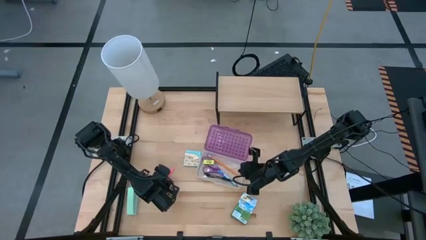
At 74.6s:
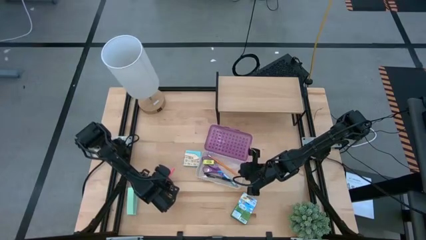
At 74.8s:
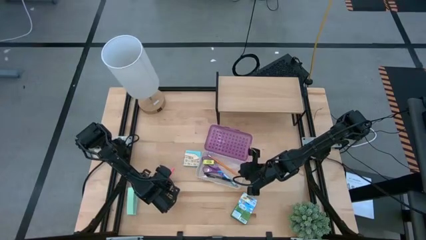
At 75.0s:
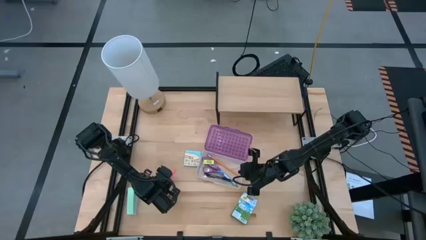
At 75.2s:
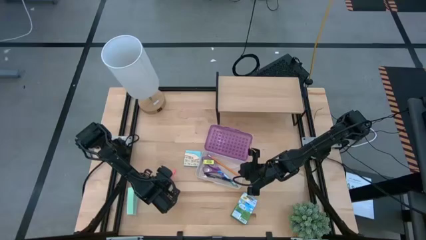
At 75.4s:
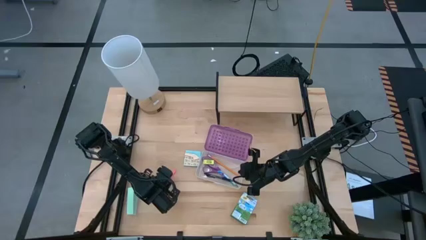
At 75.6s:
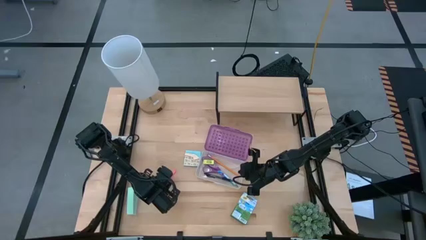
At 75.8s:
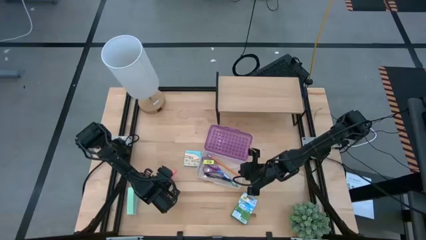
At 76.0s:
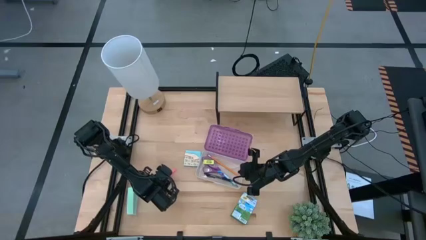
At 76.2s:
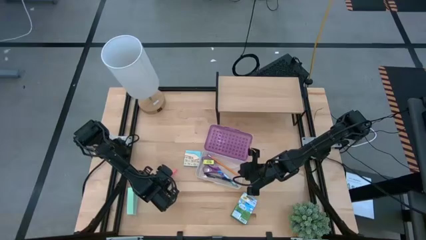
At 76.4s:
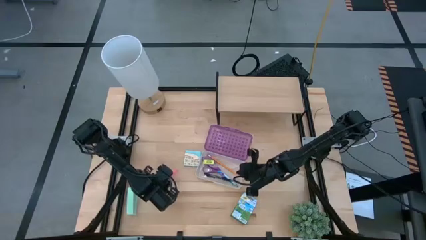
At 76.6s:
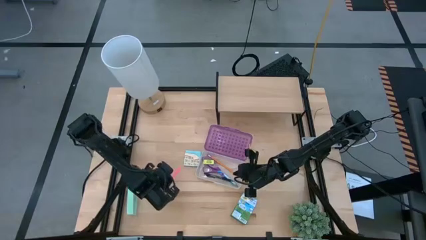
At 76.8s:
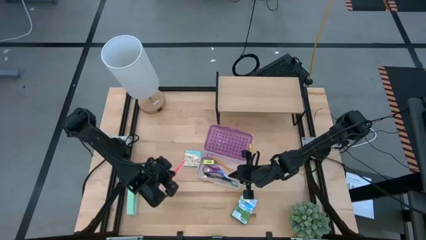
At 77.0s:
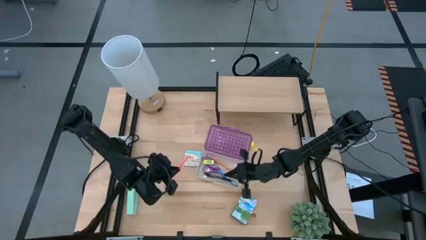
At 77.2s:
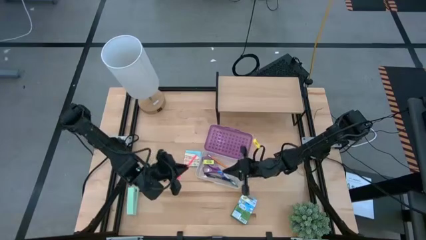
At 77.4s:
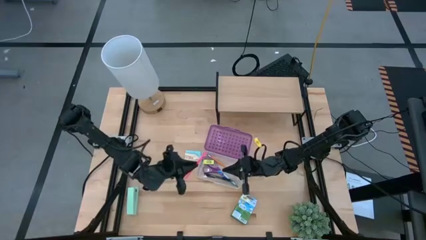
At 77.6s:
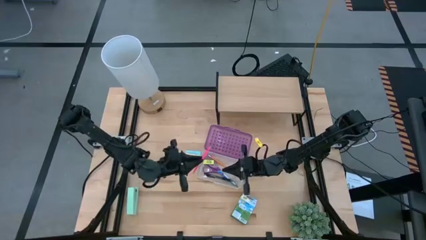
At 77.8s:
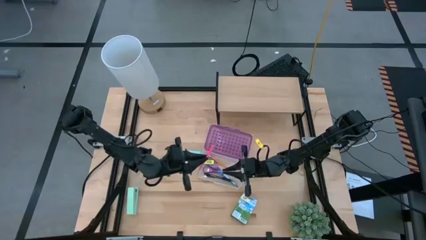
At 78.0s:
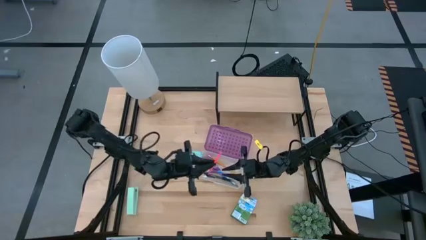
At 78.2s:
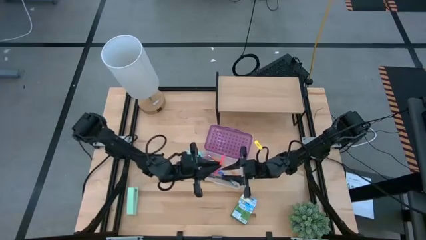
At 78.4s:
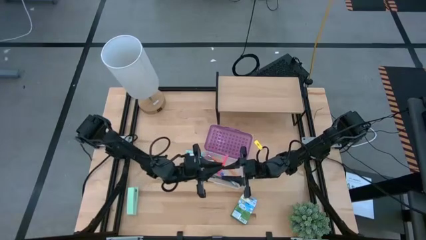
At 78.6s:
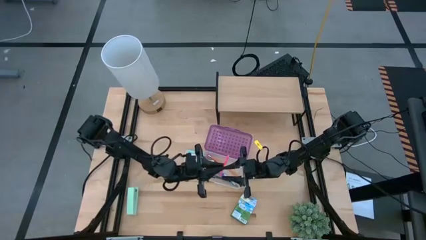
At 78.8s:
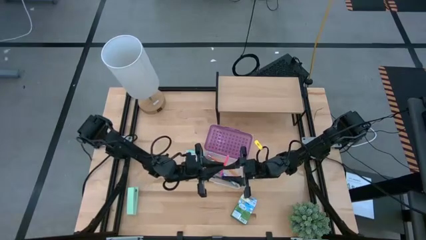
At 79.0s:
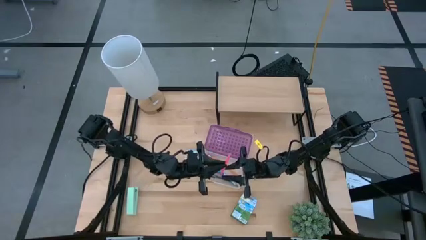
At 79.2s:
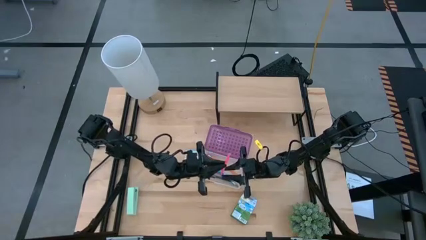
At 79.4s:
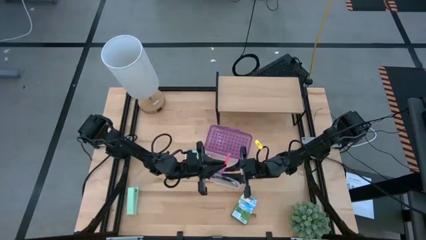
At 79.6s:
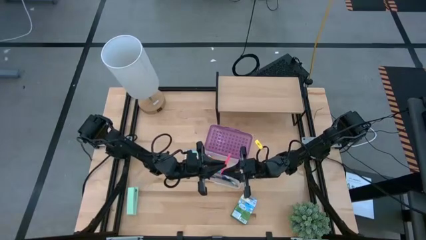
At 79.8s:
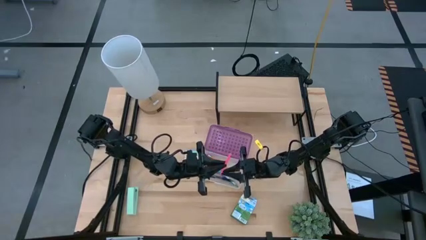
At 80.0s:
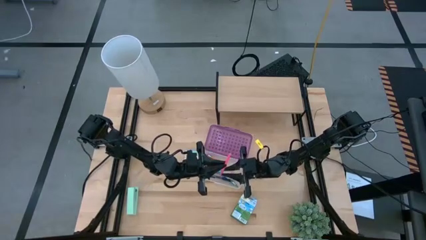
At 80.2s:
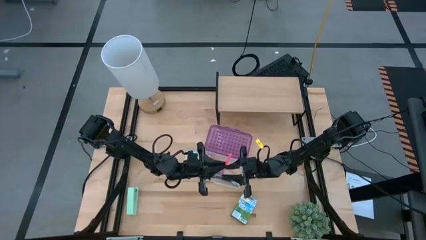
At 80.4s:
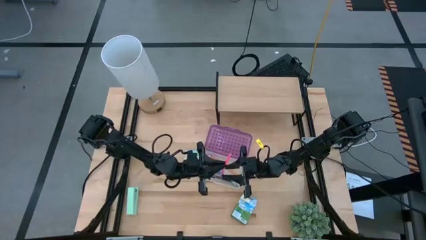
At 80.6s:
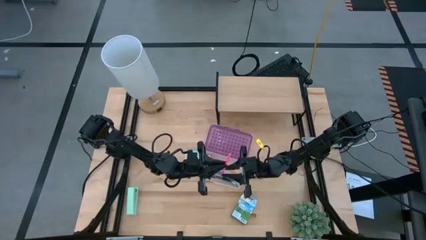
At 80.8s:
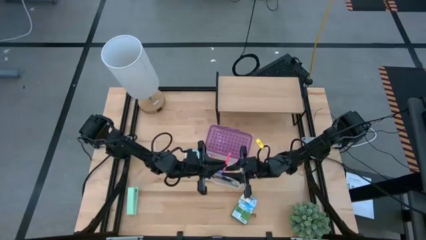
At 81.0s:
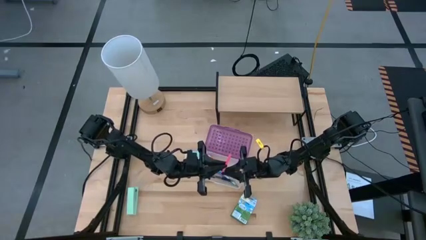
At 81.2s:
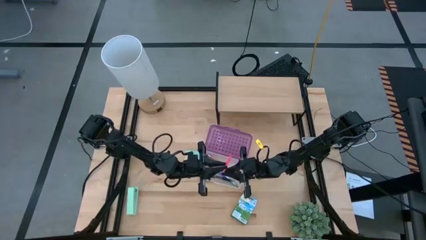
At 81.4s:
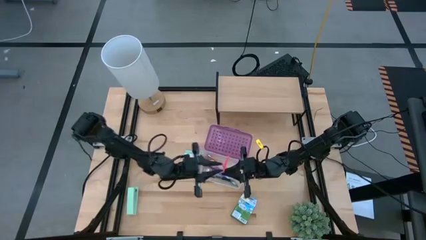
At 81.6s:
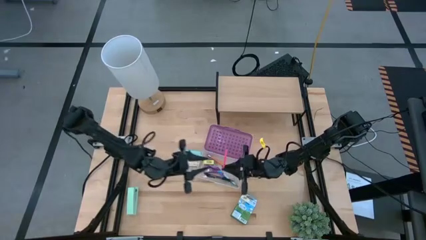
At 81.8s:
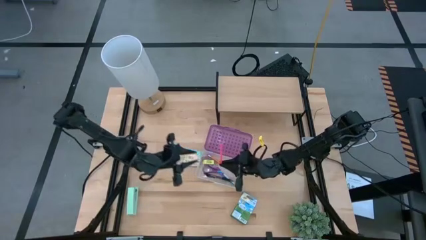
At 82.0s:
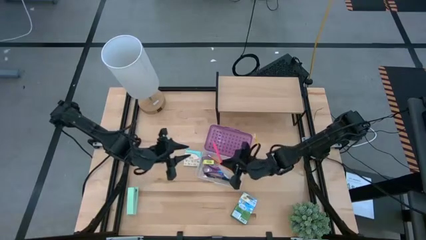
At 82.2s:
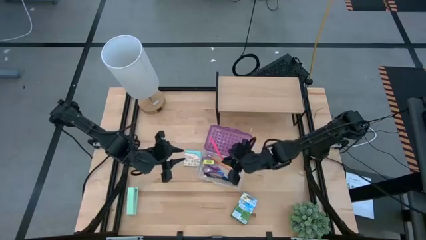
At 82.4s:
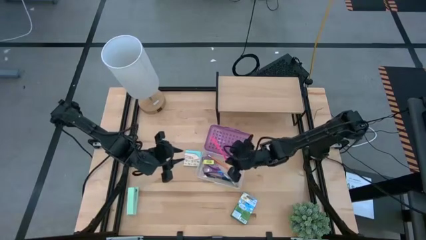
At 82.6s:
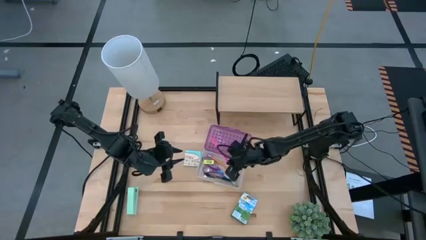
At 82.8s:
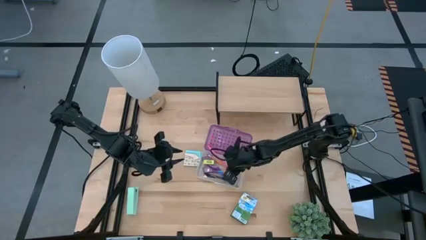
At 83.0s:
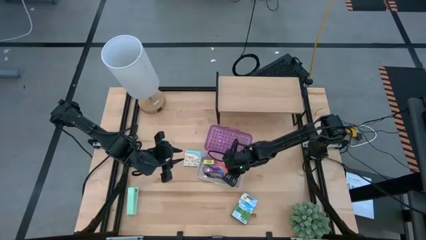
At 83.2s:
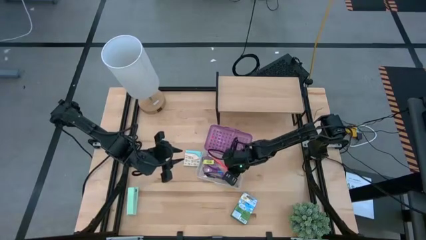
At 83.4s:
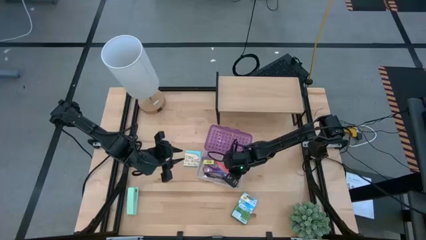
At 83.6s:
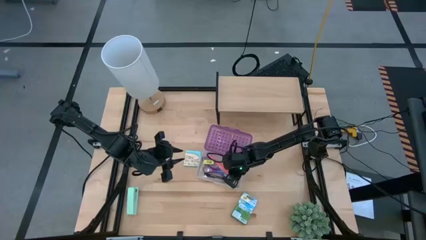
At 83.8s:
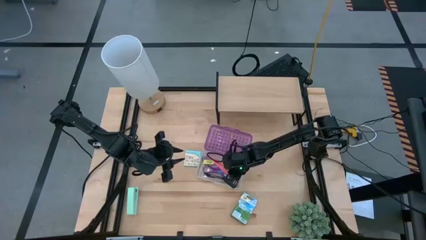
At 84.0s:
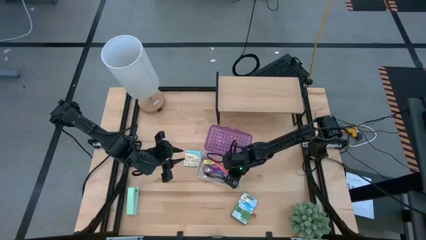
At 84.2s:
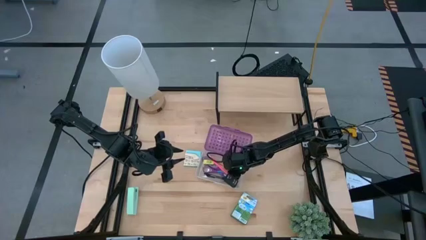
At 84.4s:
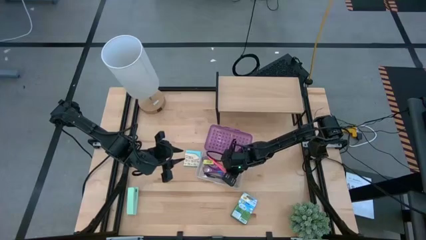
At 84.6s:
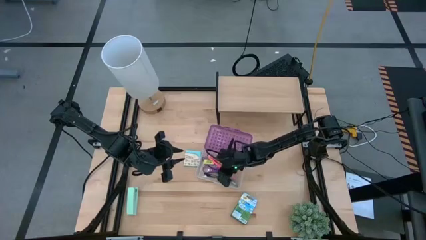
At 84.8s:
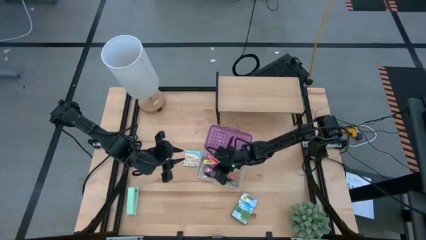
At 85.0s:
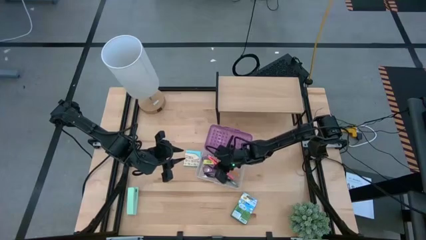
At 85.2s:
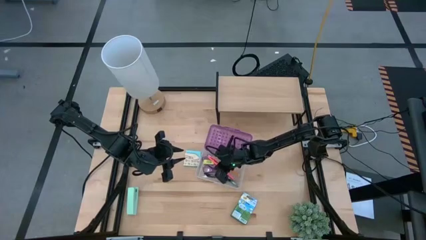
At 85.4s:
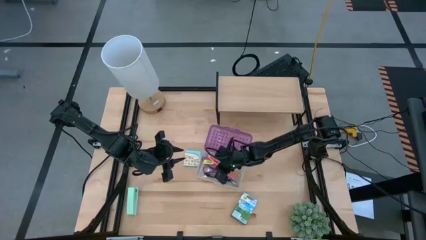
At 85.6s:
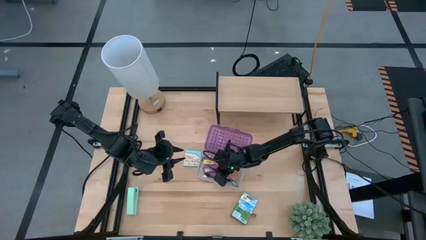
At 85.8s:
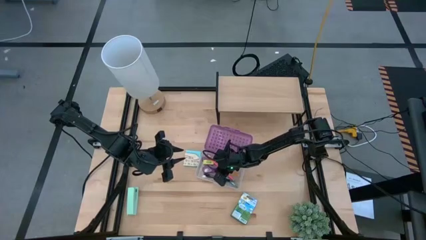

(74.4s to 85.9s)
Task: Pack school essentials
Put the pink pencil into the purple supply box

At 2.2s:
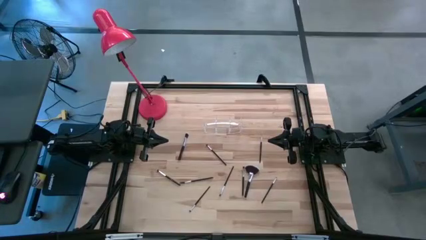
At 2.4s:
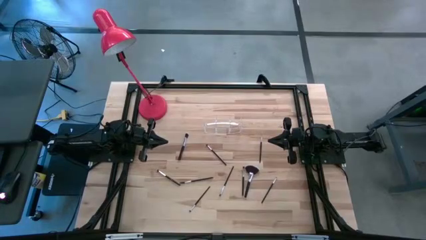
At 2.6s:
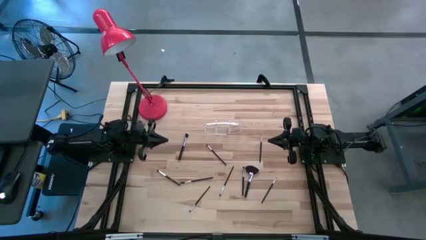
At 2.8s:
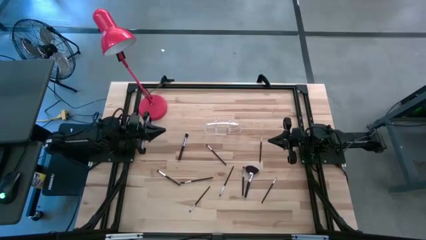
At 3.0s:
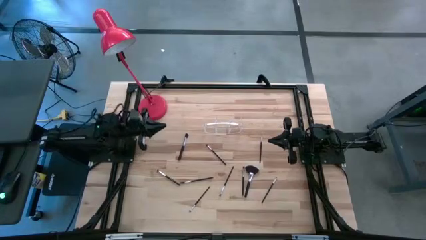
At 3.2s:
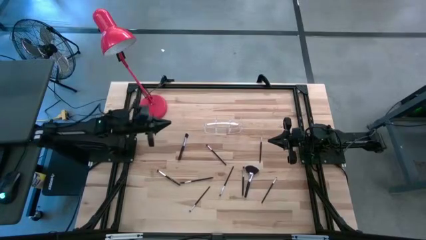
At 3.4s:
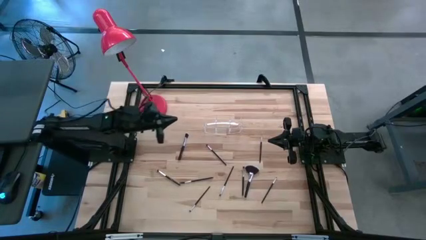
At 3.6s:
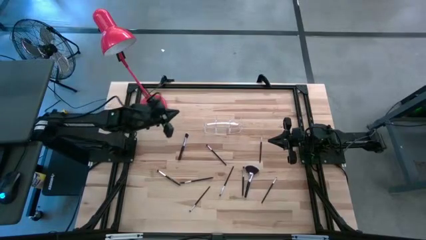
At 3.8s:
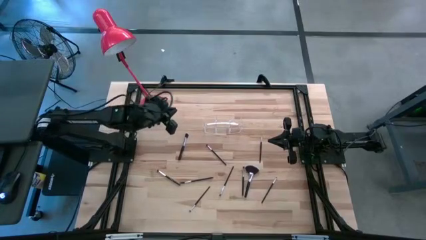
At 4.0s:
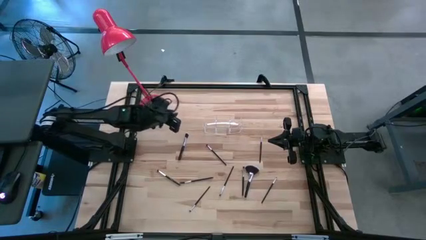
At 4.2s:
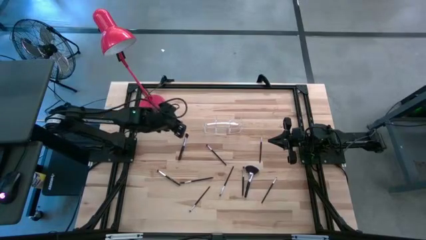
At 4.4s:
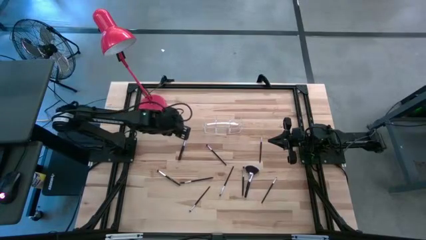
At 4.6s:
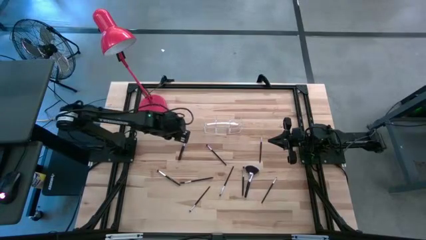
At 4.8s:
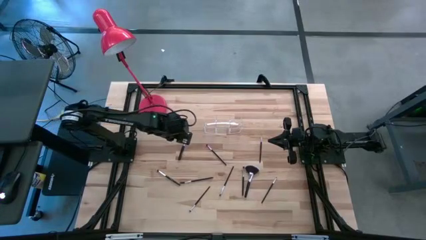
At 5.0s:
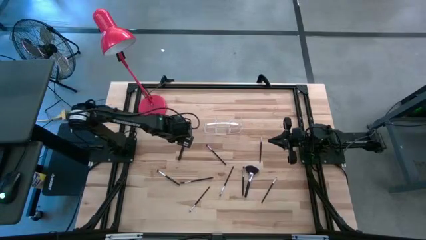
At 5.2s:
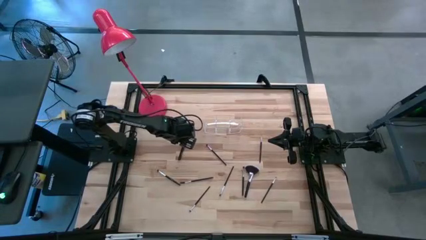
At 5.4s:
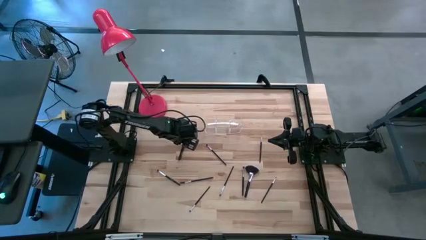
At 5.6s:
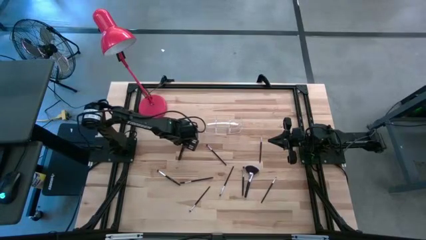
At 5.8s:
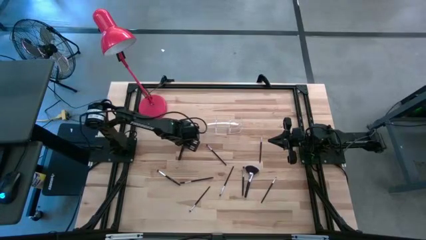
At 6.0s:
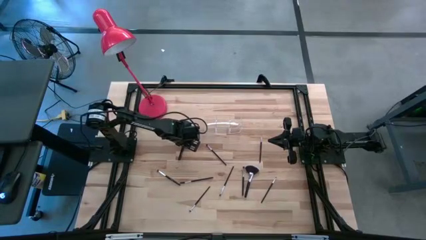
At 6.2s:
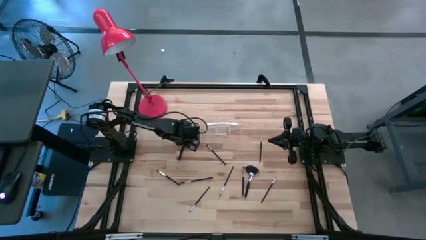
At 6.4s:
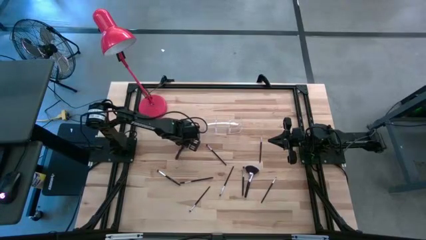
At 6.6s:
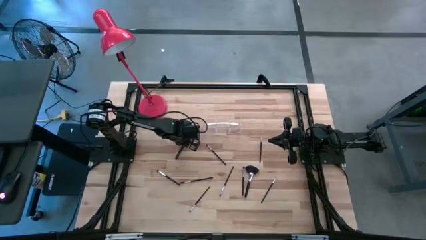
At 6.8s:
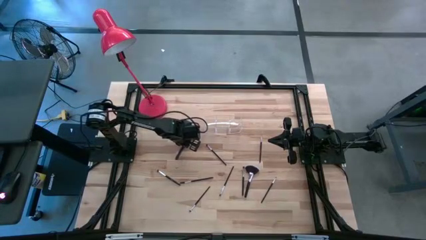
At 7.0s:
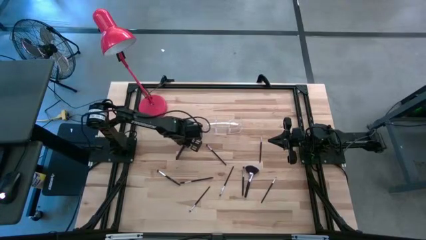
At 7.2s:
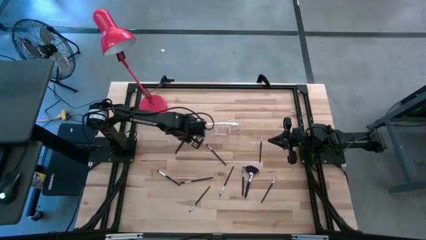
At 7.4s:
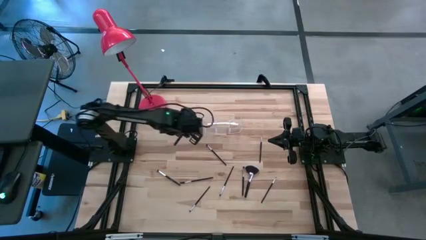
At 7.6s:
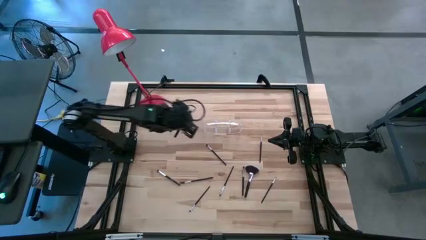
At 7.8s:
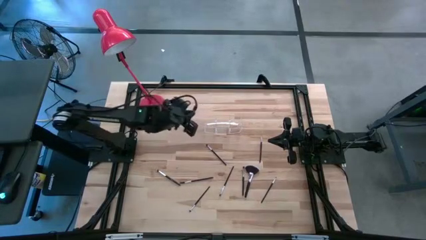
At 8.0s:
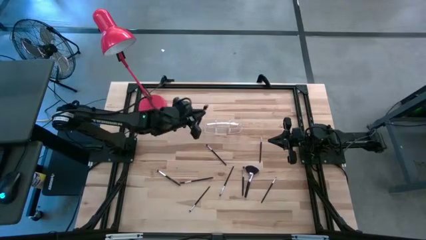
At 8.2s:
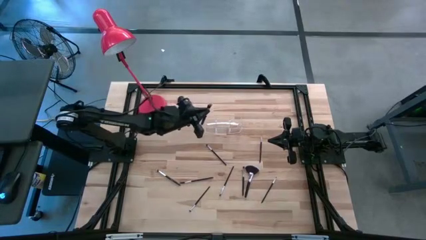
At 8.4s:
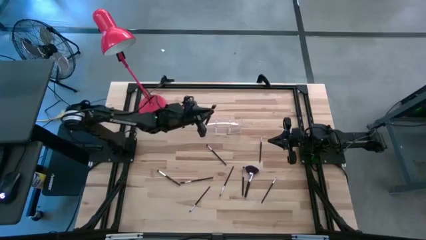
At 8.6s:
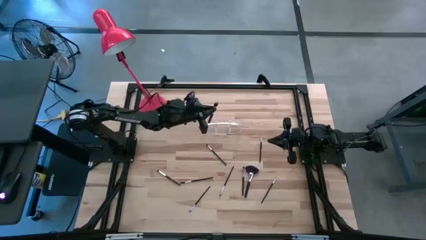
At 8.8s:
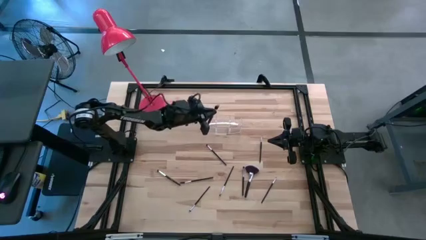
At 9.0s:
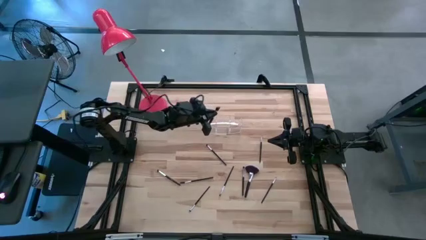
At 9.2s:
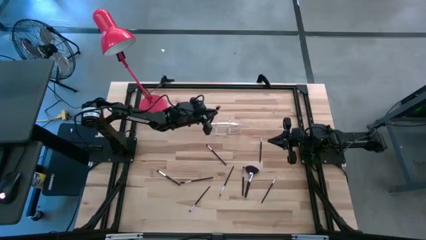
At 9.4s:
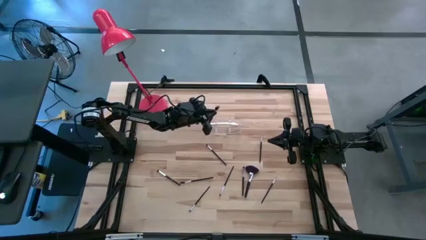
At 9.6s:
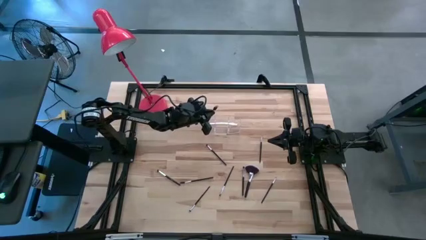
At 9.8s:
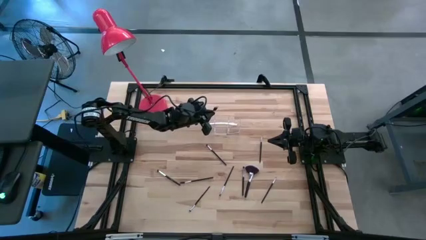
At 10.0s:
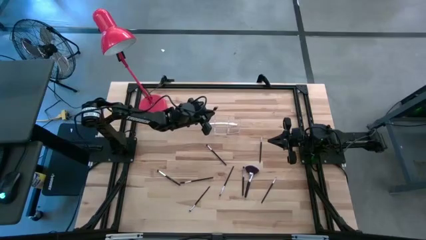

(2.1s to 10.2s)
Task: Pick & Place Makeup Supplies
Put the makeup brush into the transparent organizer
